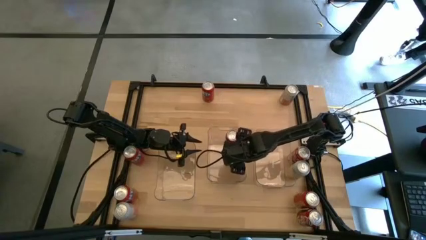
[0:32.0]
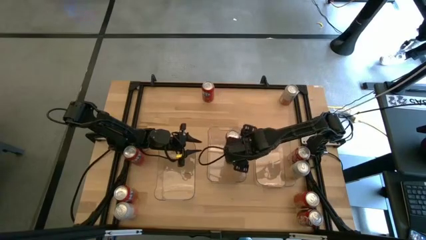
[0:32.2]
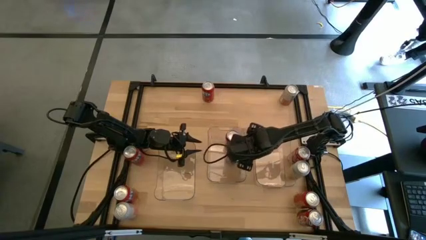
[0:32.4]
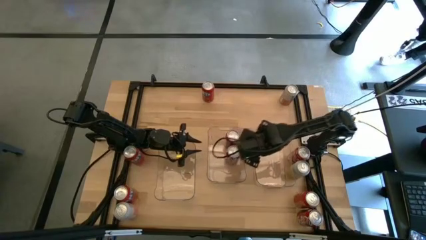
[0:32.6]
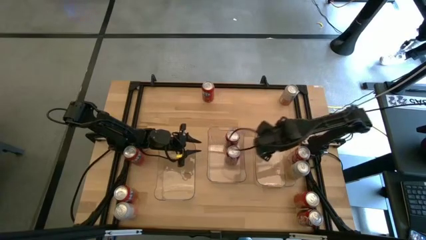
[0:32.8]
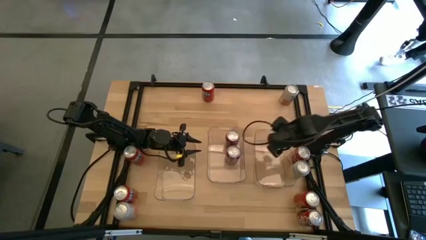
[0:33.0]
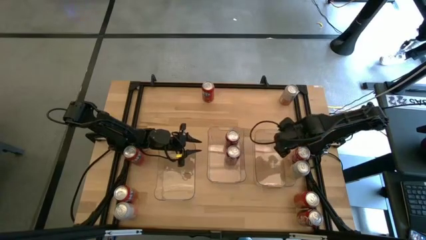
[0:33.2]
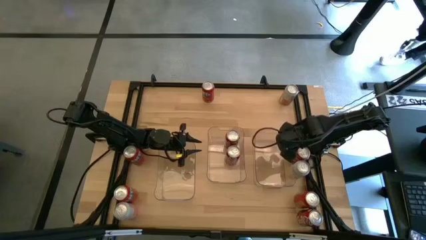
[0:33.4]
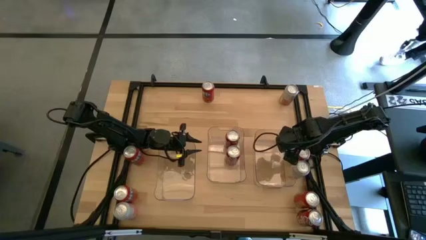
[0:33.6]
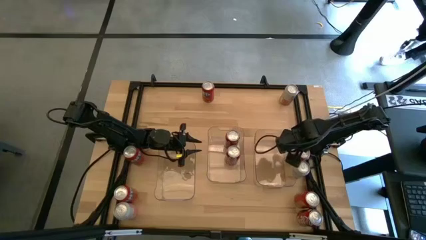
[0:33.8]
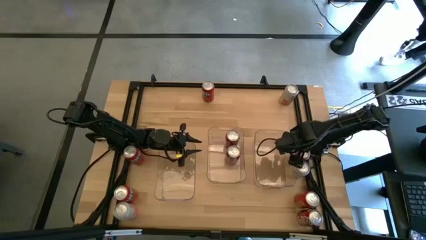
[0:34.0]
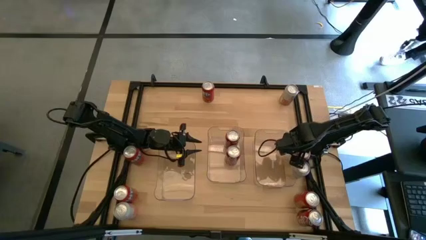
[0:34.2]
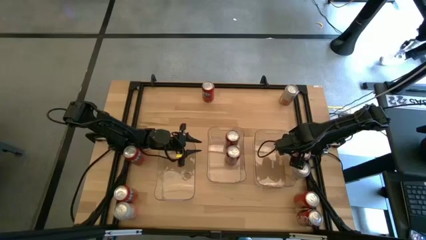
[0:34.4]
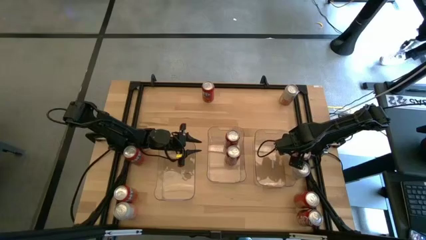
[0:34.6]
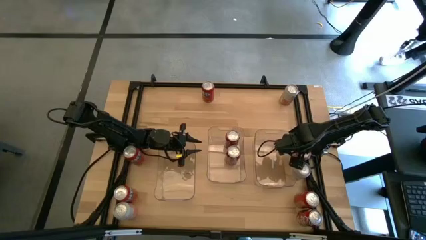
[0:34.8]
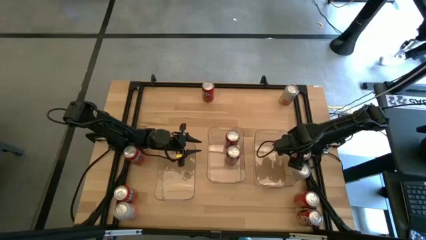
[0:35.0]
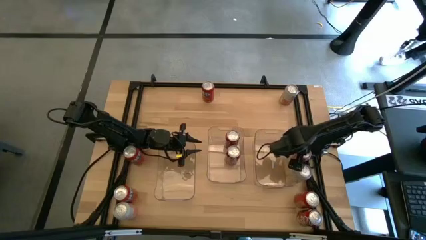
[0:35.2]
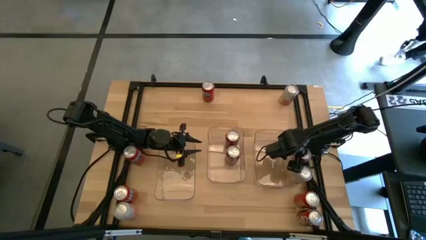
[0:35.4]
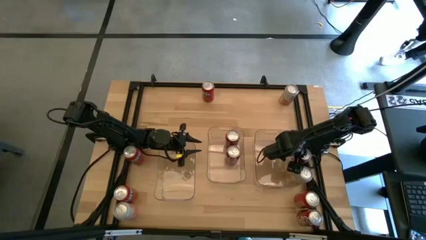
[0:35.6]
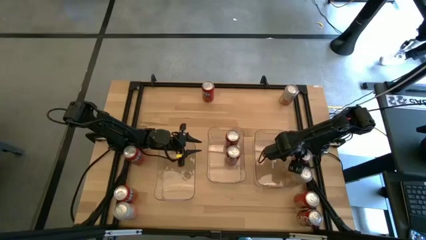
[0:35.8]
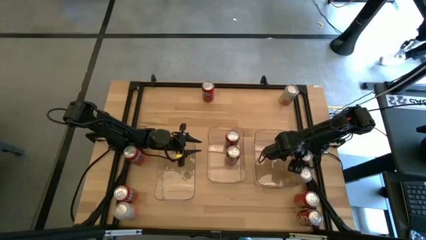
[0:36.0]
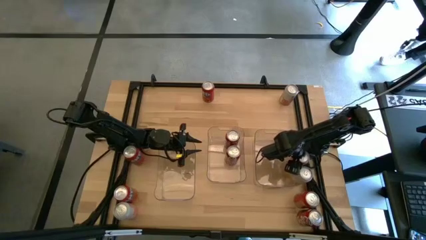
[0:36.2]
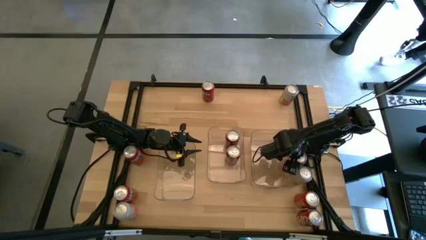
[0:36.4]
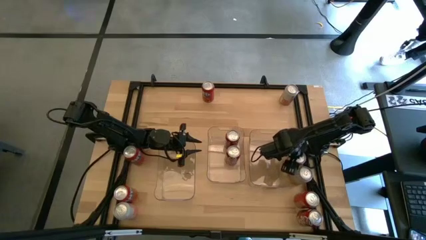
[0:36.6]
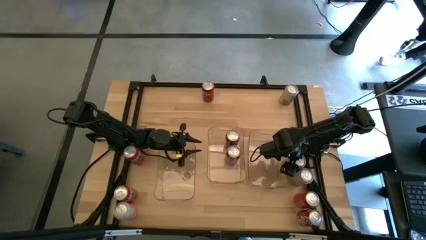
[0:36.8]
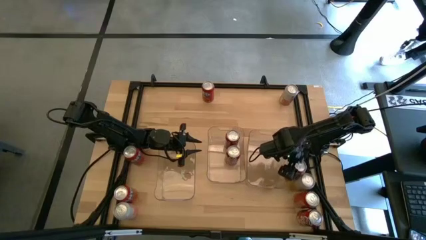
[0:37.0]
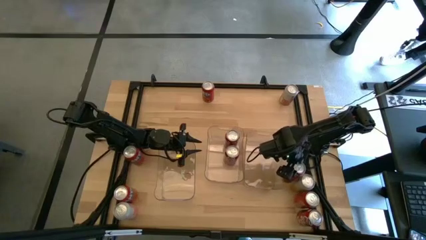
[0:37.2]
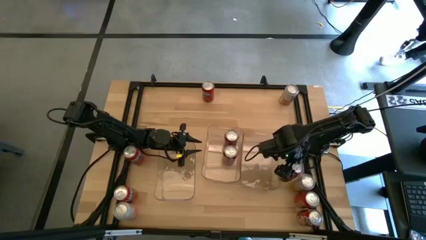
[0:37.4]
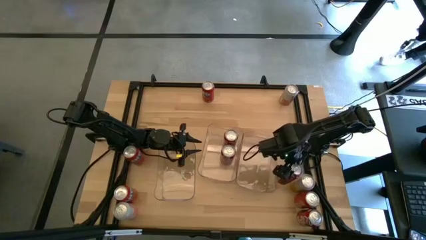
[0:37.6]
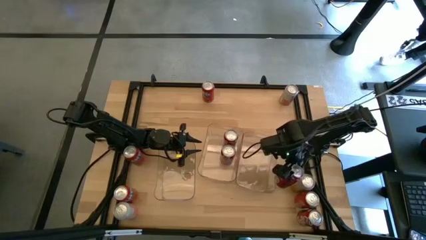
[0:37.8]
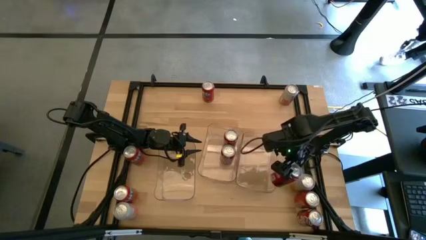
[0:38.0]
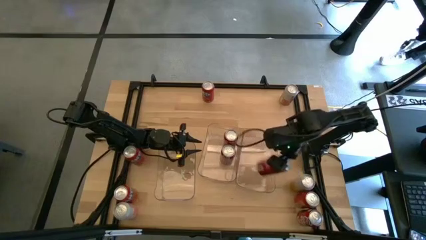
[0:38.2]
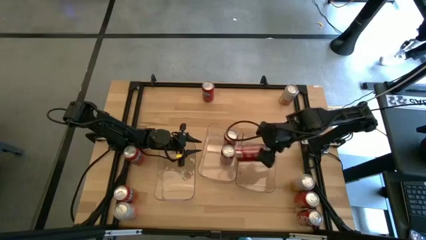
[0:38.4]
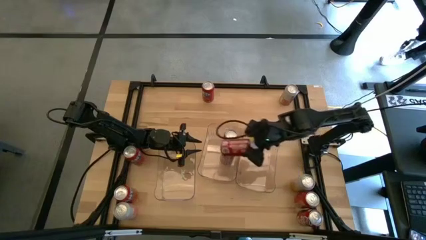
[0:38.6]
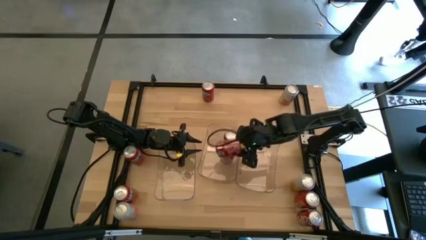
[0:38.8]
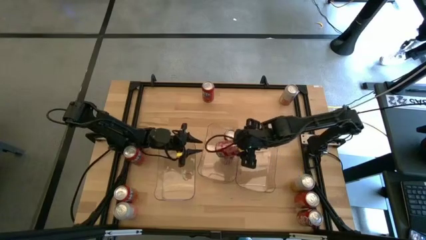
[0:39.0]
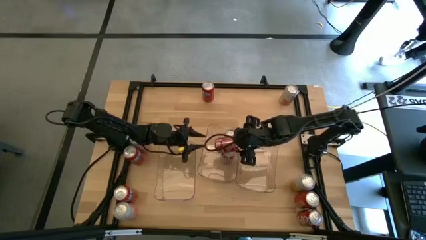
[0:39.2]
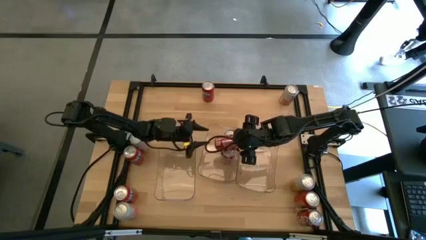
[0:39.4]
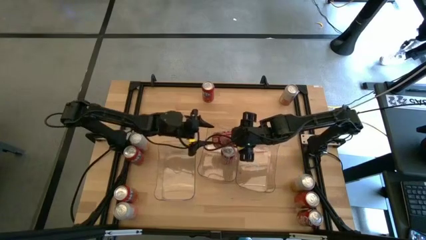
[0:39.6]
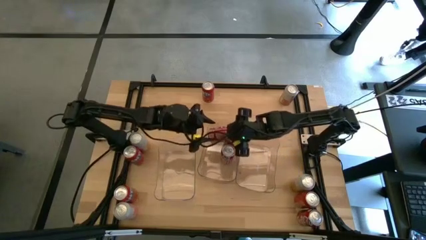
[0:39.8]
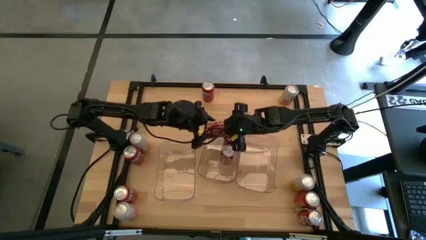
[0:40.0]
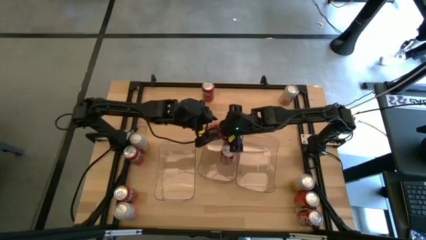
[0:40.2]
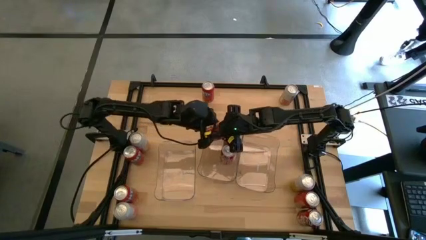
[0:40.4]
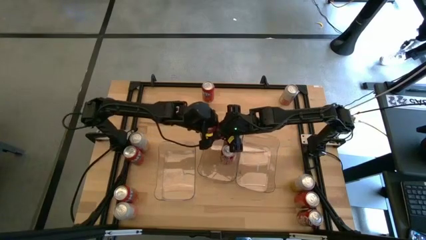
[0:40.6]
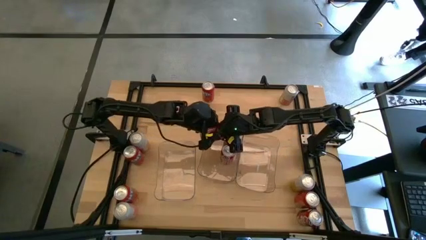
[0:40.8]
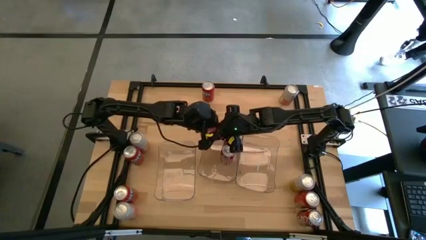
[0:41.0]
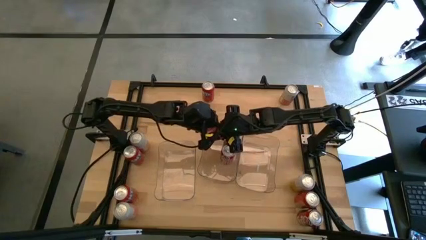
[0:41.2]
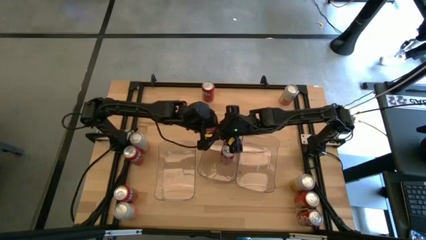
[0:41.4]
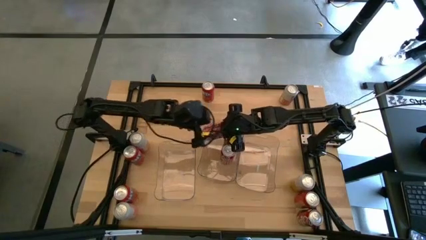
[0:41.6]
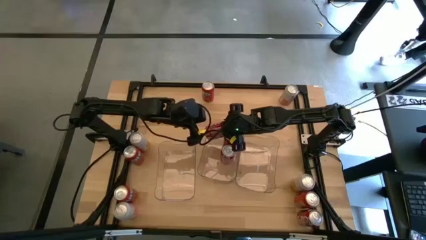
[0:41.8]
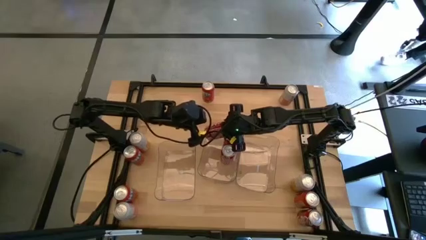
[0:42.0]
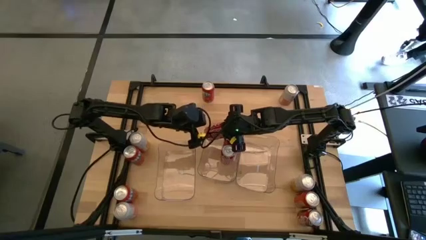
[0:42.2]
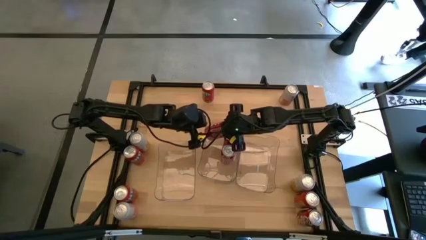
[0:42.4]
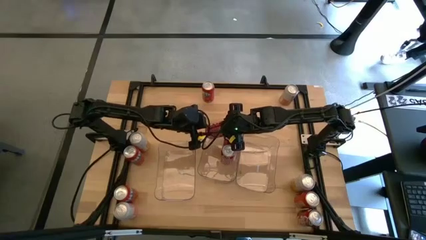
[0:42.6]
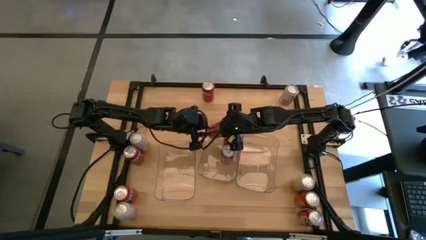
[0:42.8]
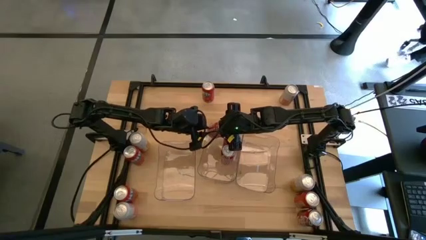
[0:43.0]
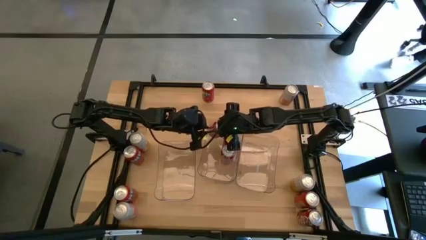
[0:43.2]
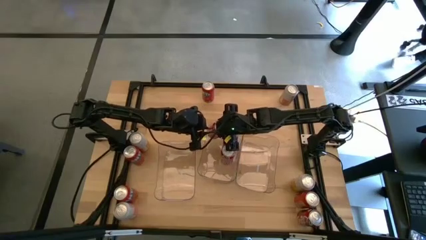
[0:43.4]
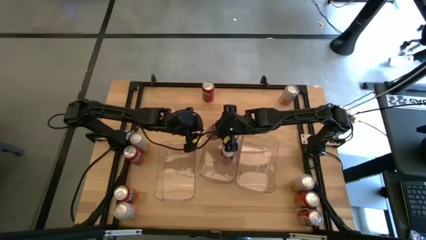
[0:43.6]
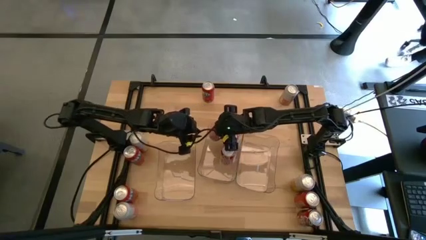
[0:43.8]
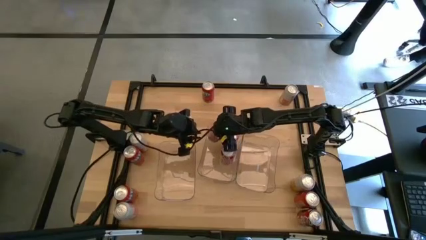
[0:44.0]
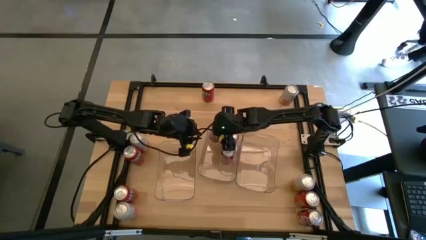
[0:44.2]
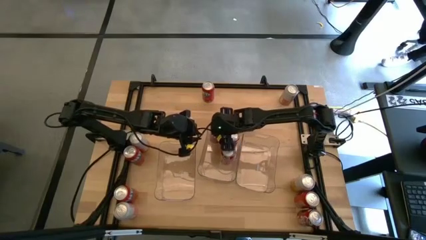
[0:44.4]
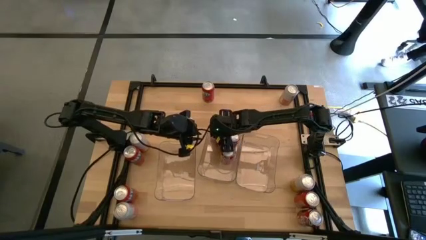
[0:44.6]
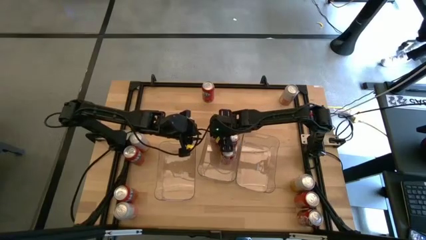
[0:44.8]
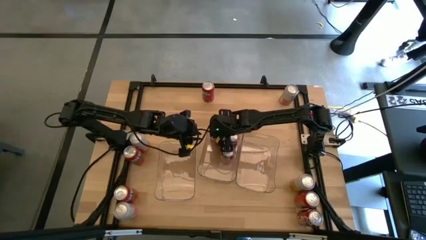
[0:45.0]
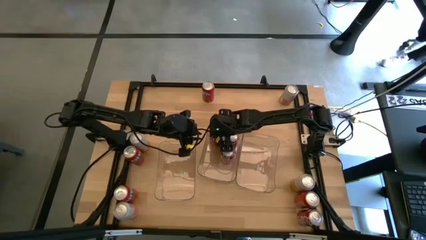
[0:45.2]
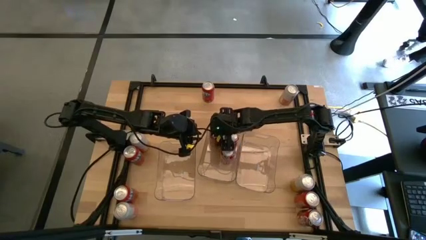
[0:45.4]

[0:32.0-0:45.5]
Task: Sort soda cans
Put the top red white soda can into the center transparent bin
